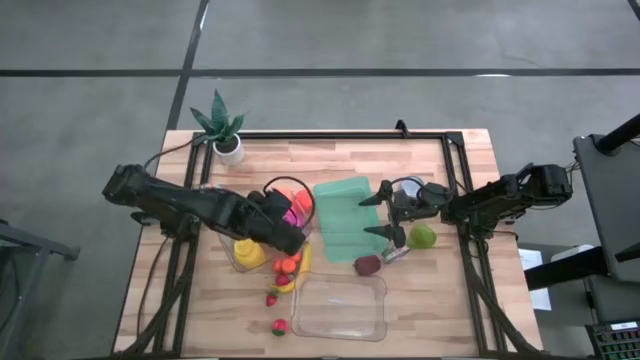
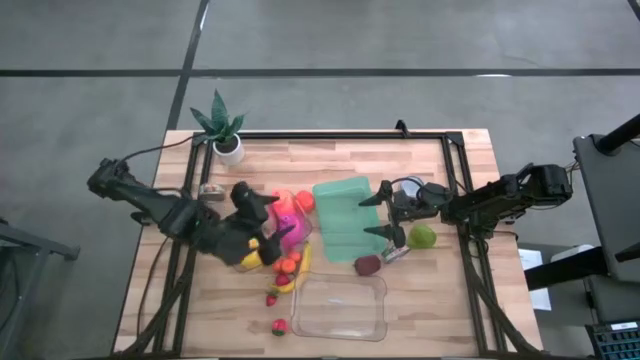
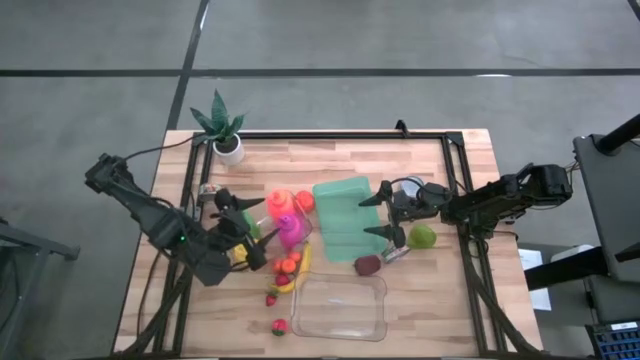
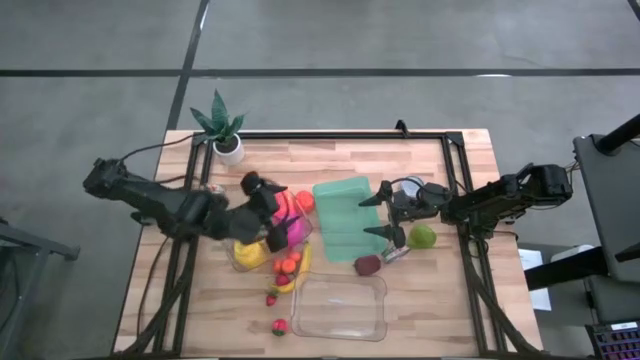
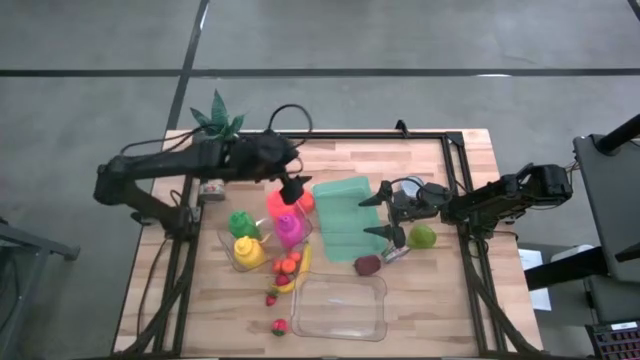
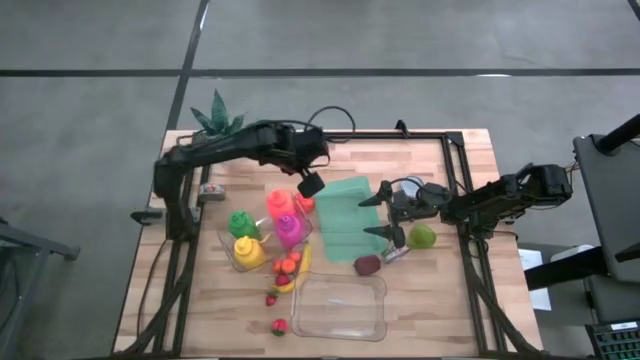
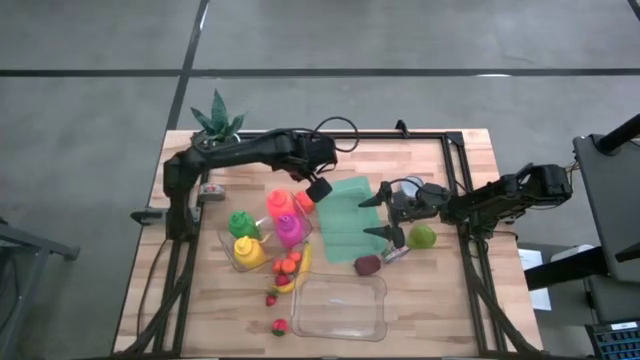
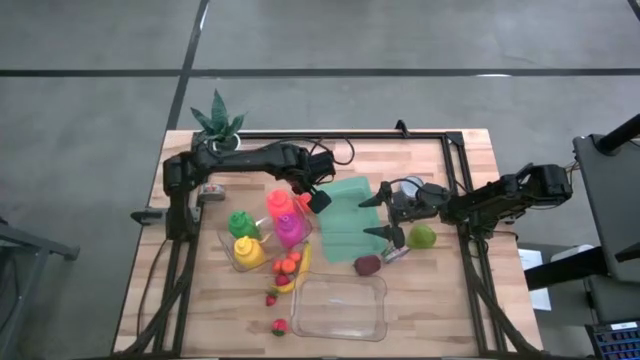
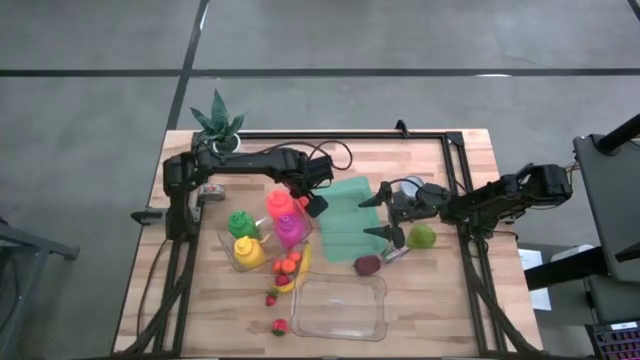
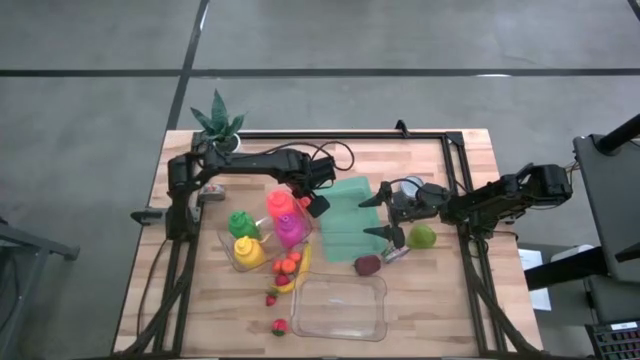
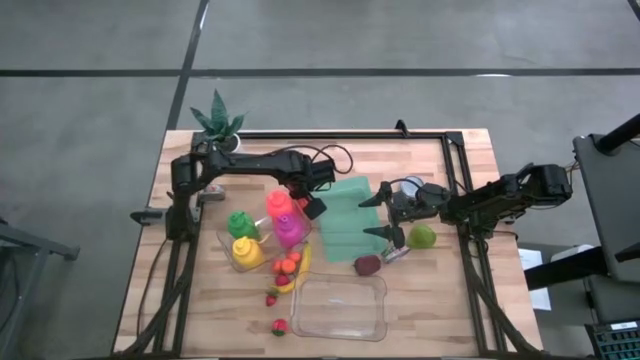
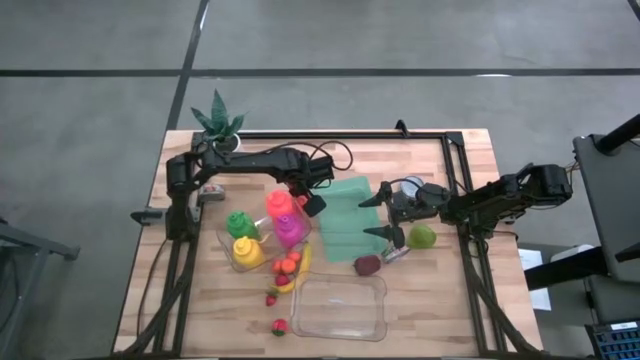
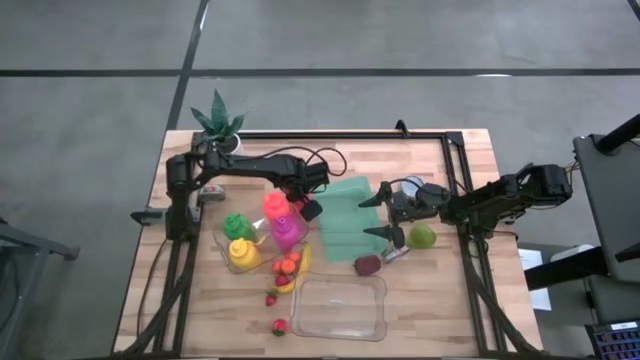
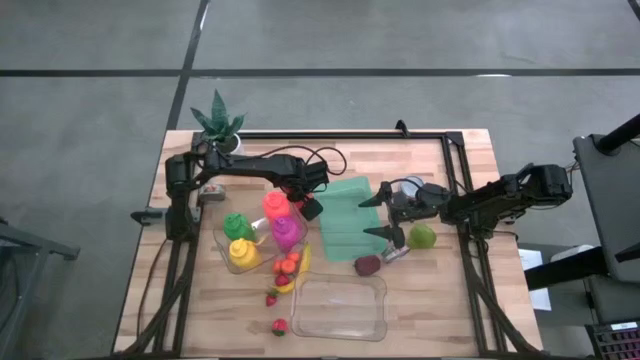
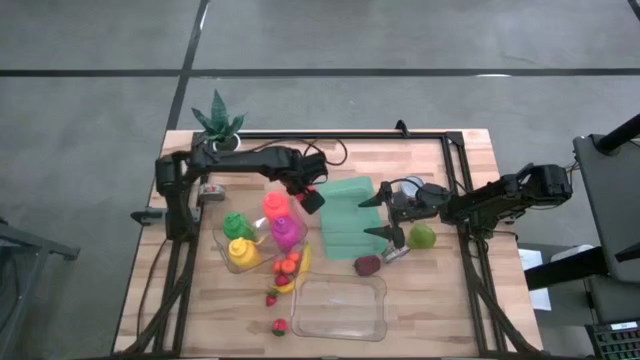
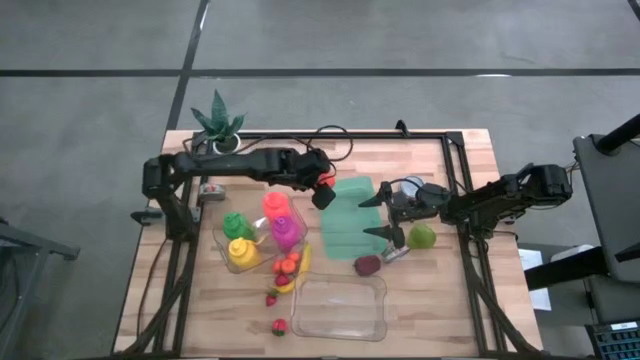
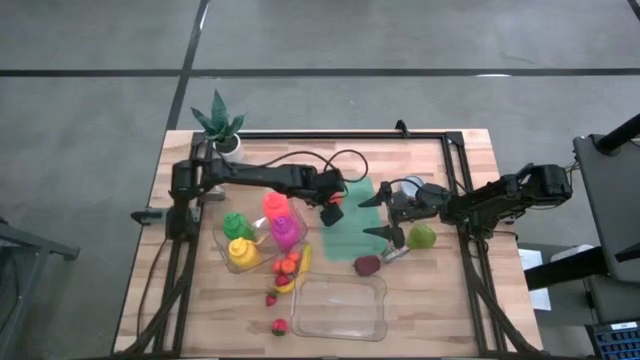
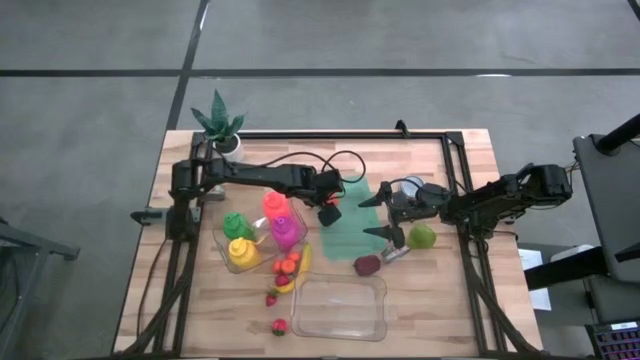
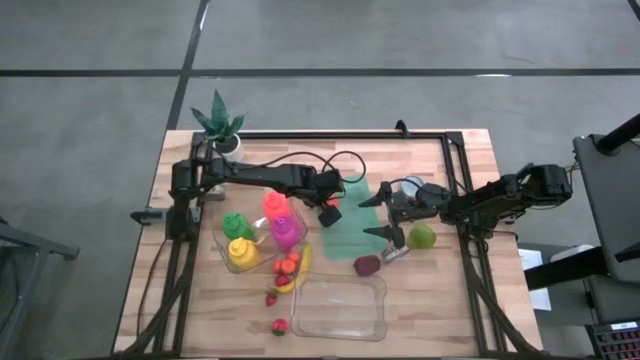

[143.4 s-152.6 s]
Task: Pick & Place Food Item
Put the orange into the green bin

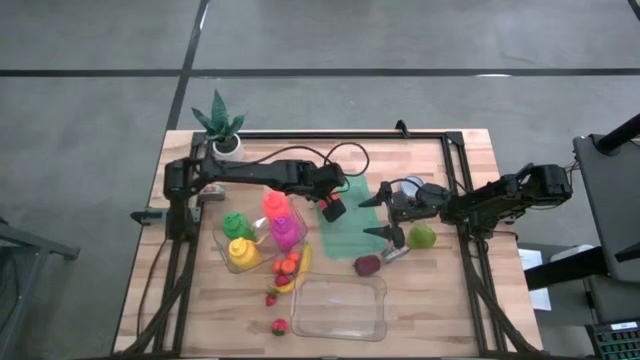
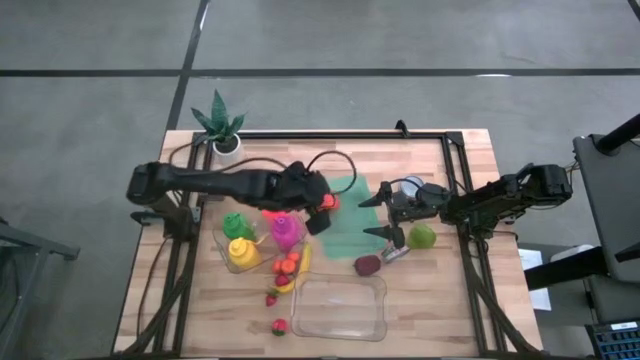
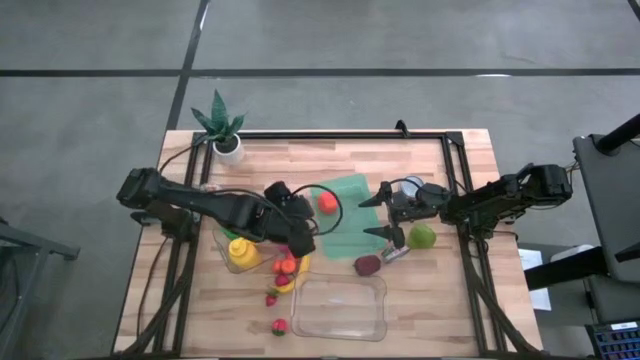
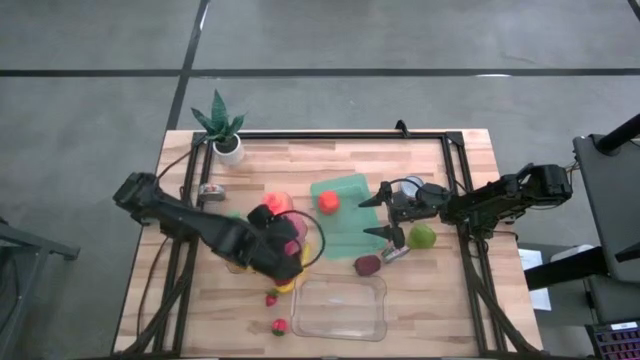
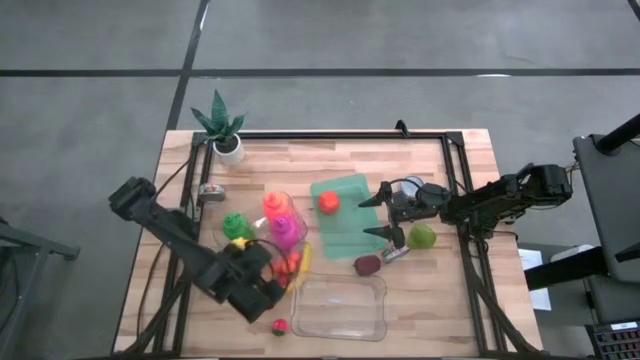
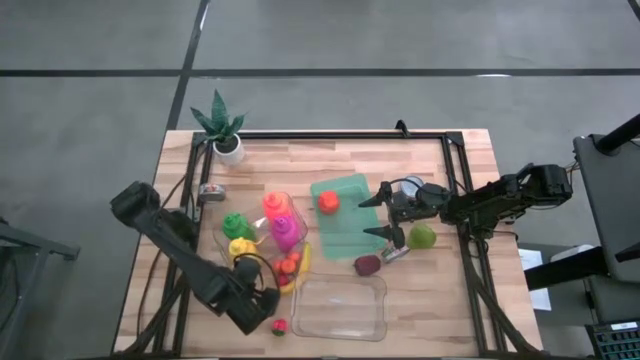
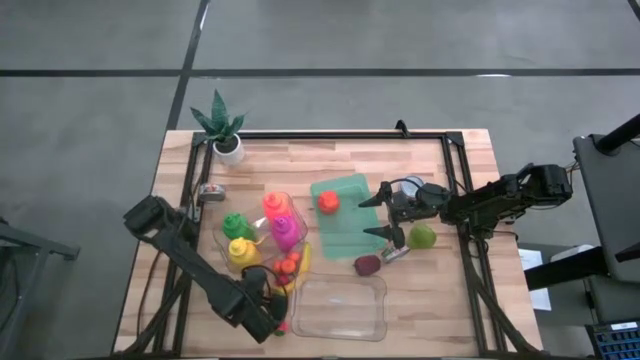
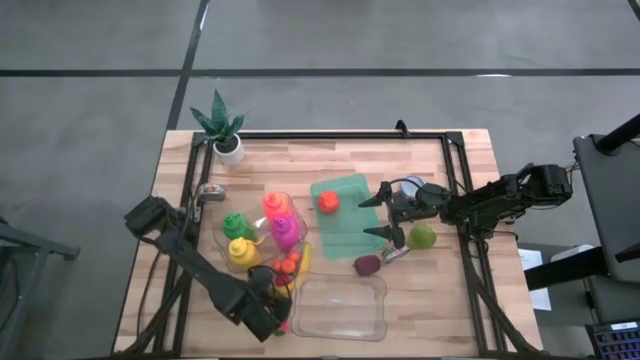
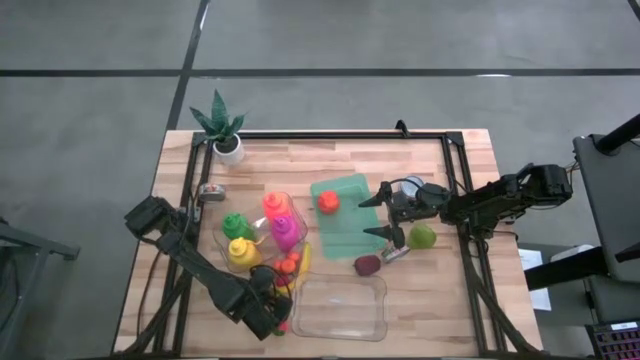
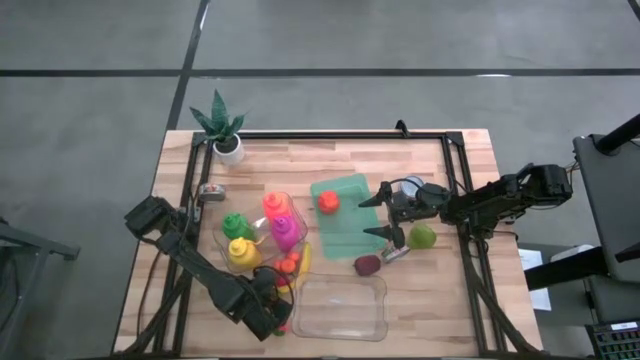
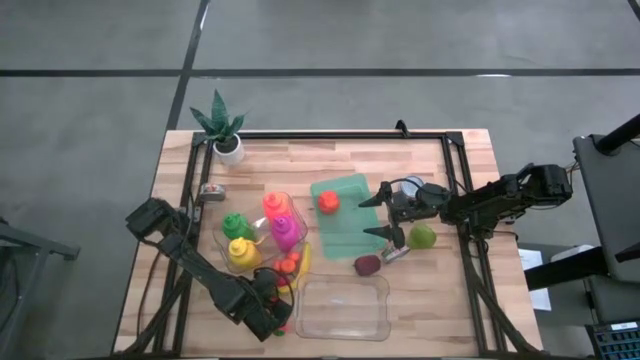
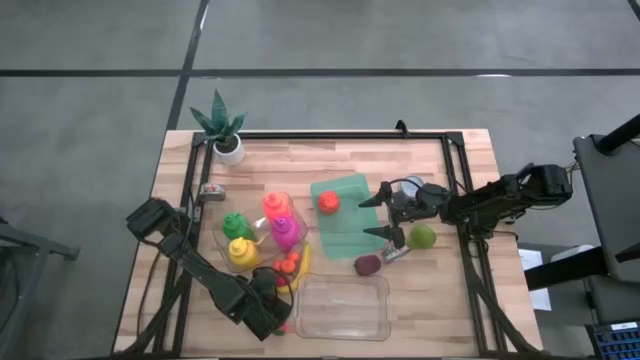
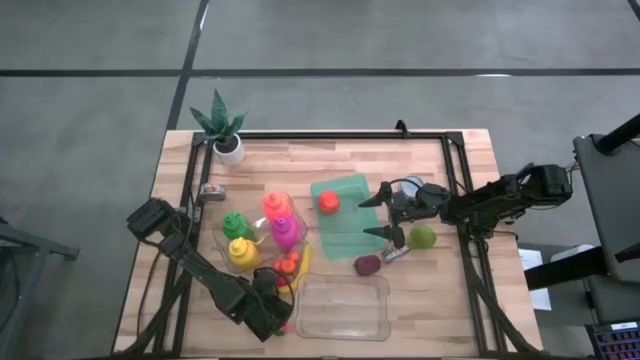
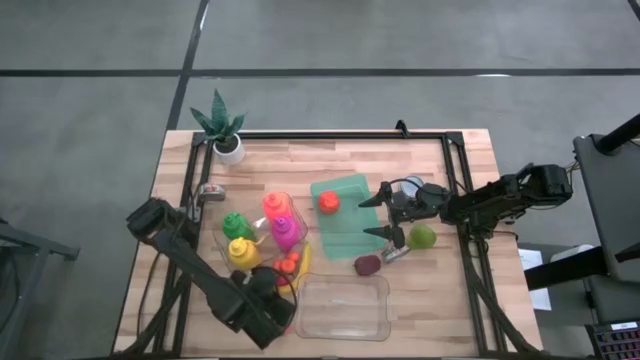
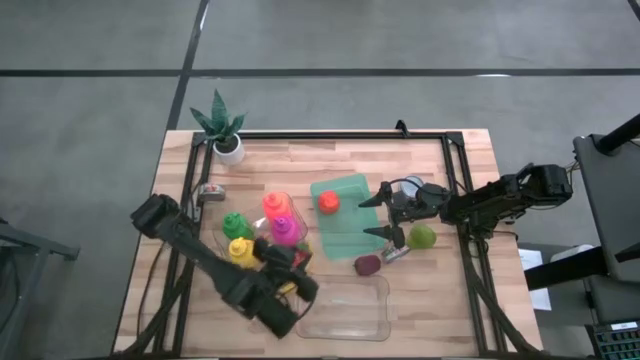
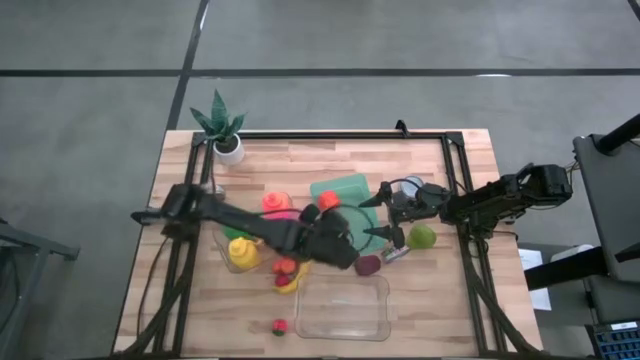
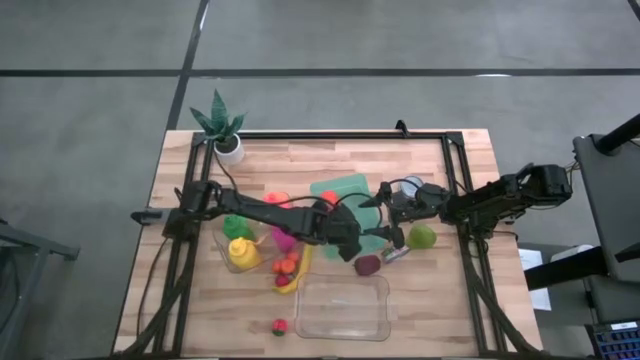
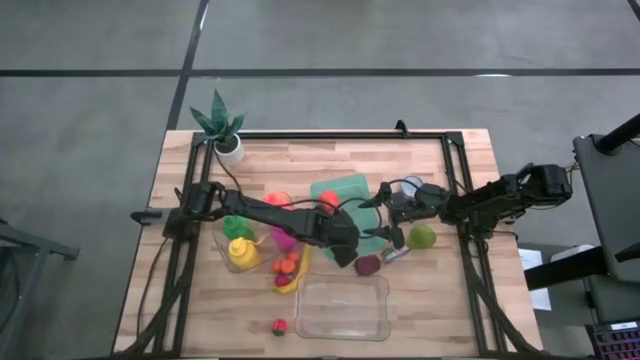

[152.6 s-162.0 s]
Put the middle red strawberry into the green bin

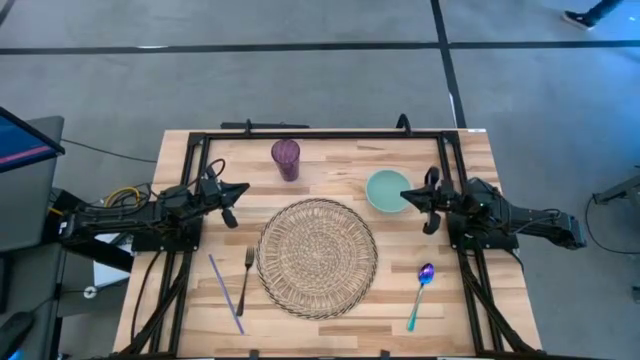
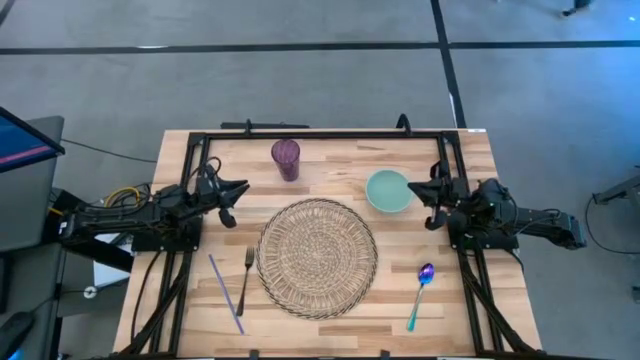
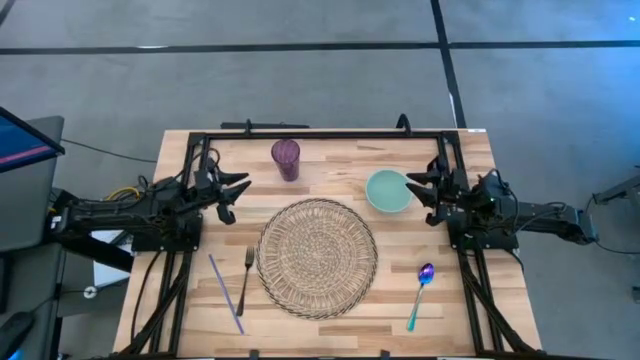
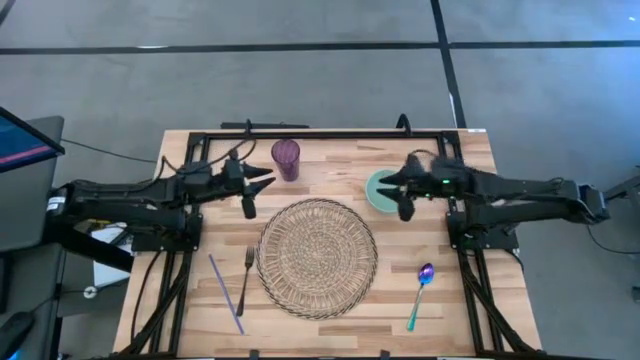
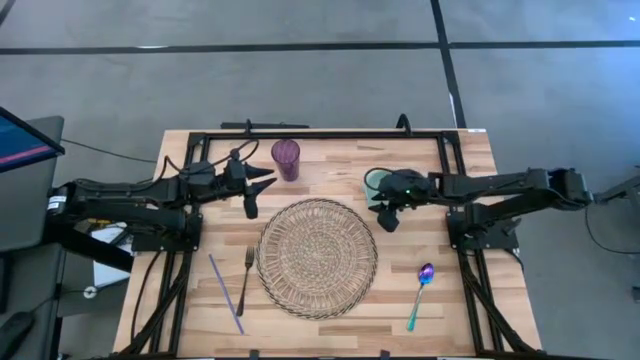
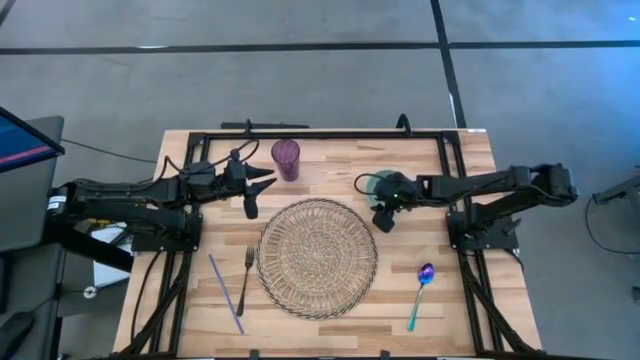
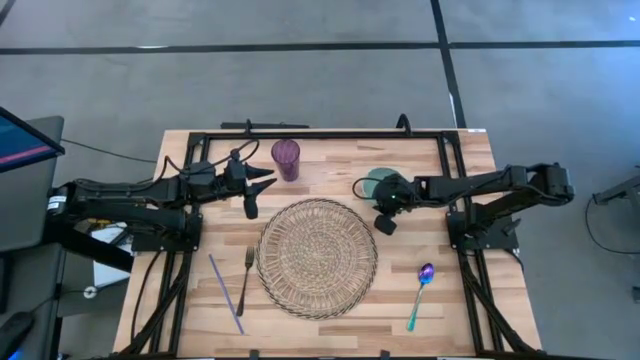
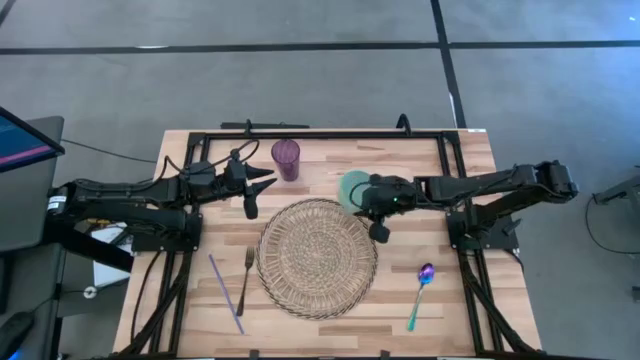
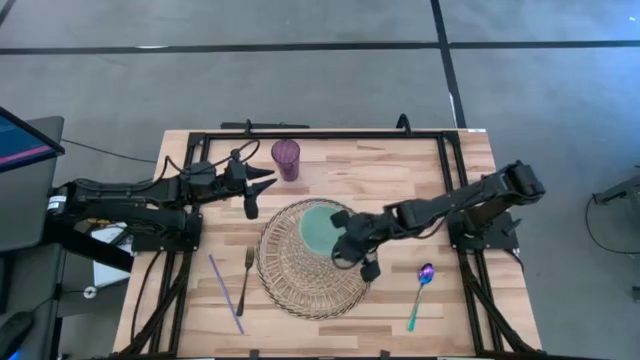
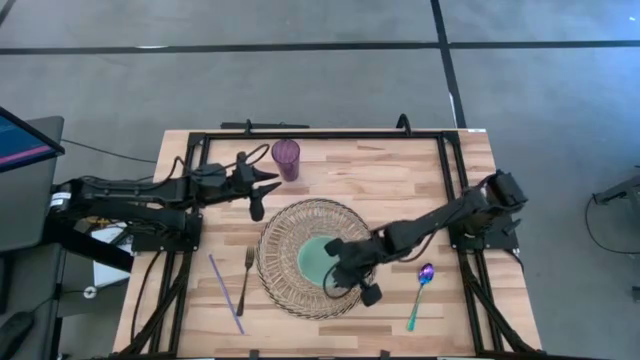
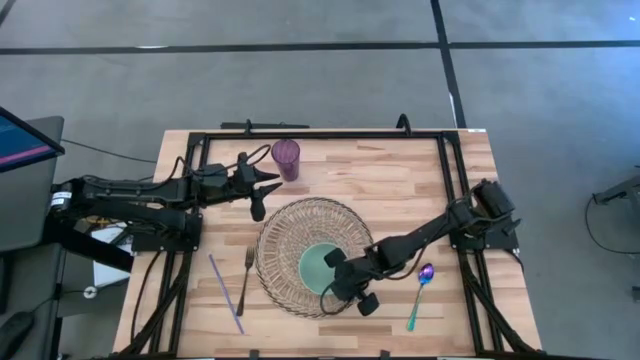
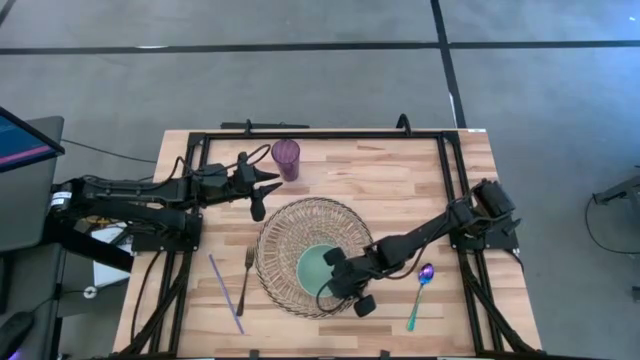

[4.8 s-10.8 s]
Task: Pick & Place Utensil
Put the light green bowl on the woven mat
